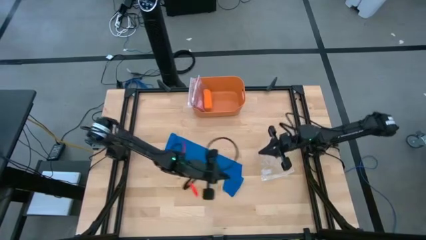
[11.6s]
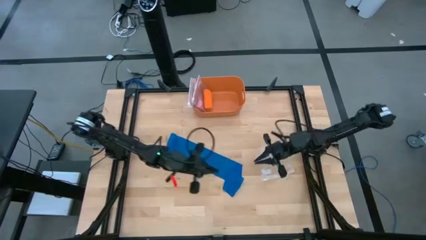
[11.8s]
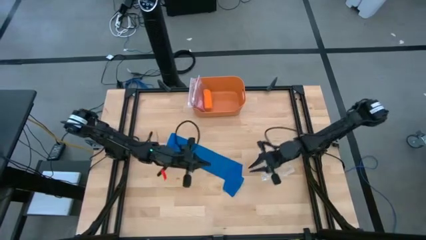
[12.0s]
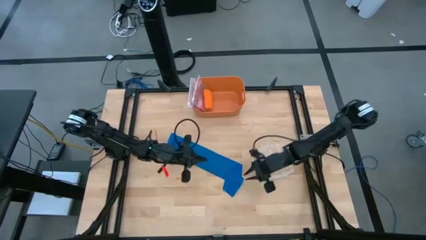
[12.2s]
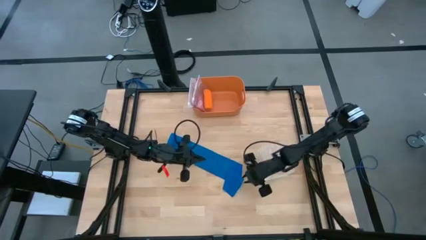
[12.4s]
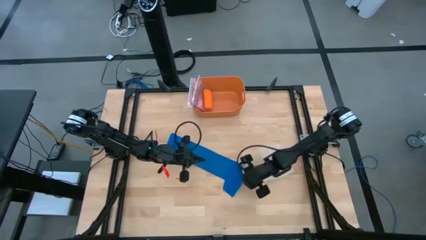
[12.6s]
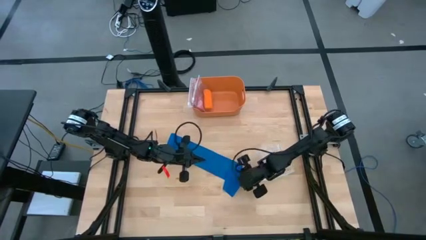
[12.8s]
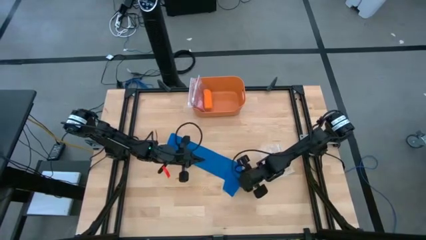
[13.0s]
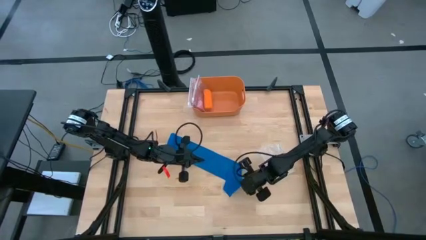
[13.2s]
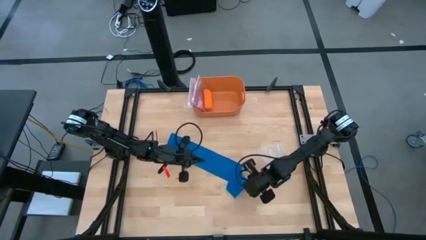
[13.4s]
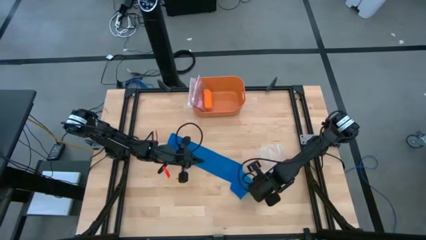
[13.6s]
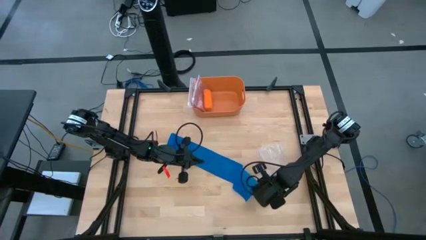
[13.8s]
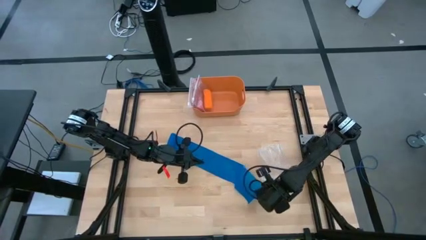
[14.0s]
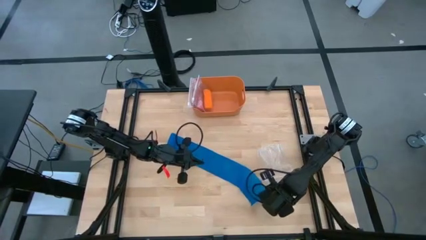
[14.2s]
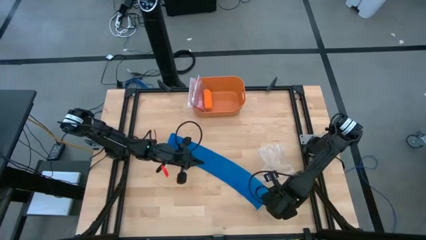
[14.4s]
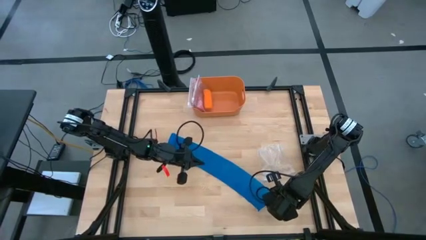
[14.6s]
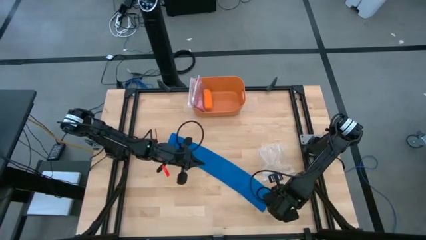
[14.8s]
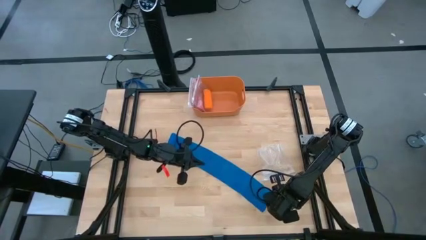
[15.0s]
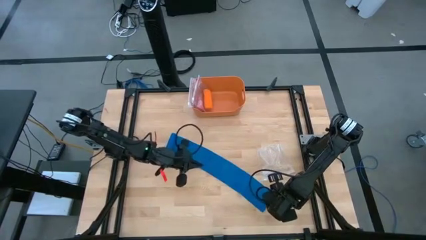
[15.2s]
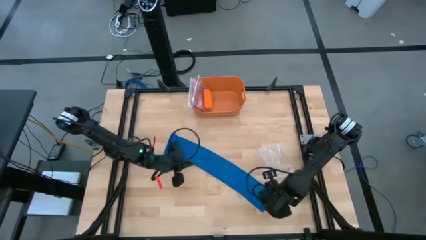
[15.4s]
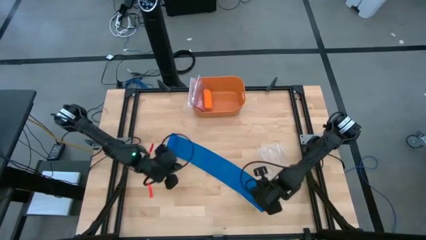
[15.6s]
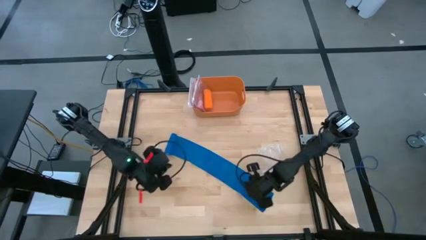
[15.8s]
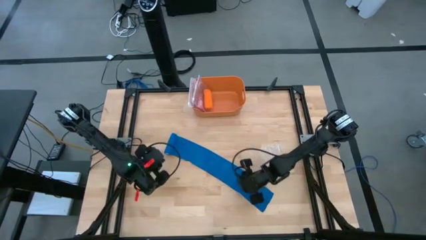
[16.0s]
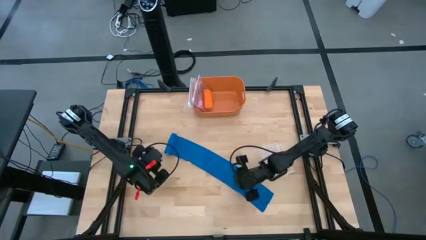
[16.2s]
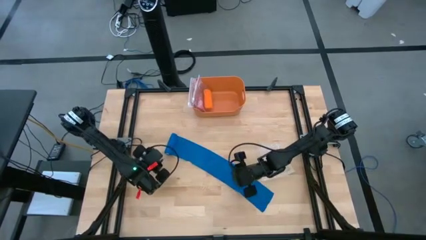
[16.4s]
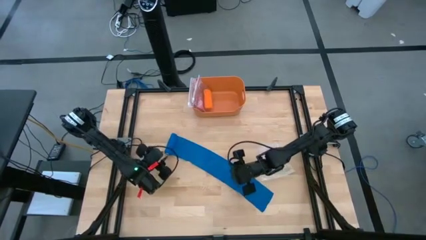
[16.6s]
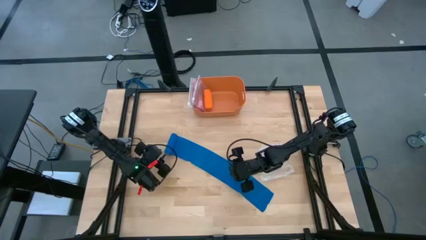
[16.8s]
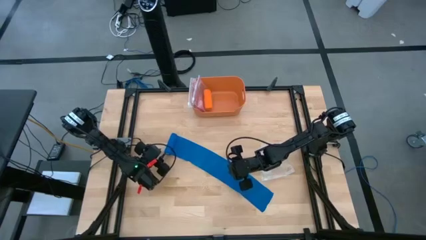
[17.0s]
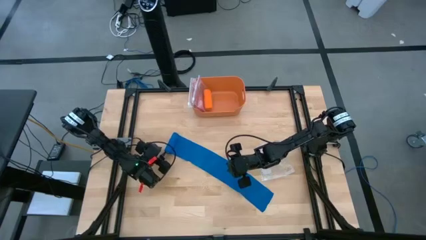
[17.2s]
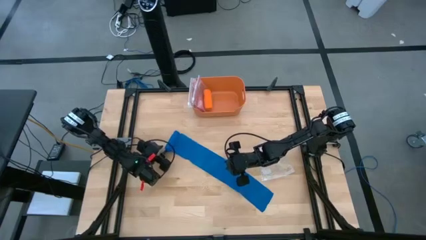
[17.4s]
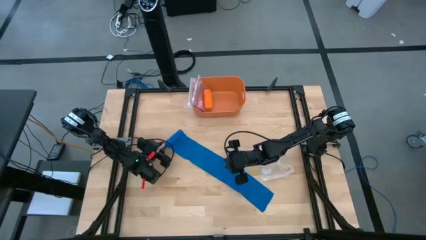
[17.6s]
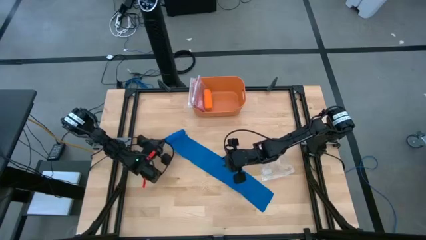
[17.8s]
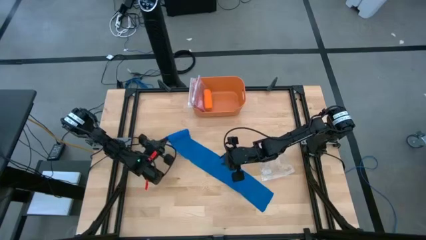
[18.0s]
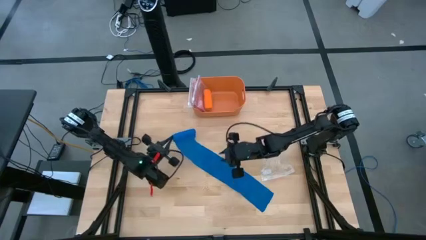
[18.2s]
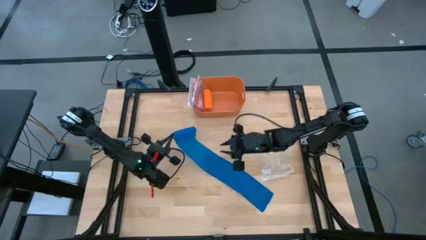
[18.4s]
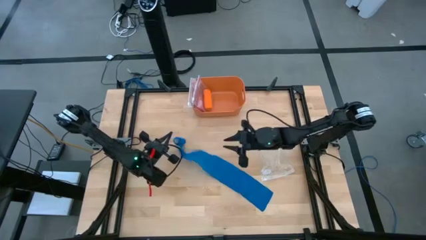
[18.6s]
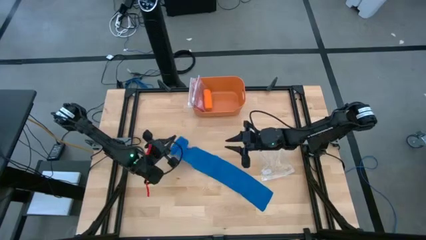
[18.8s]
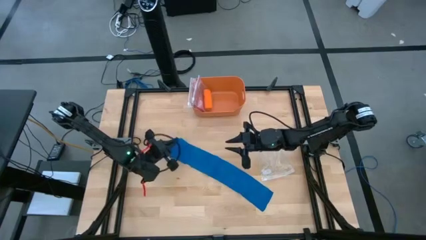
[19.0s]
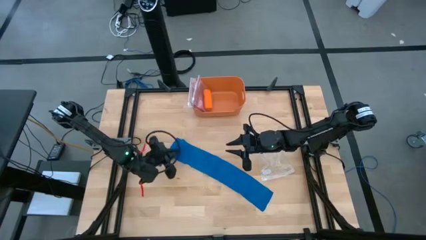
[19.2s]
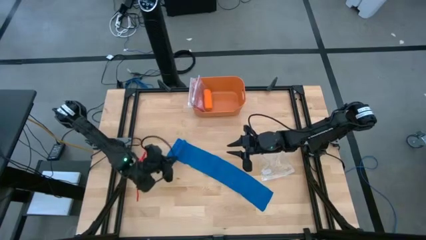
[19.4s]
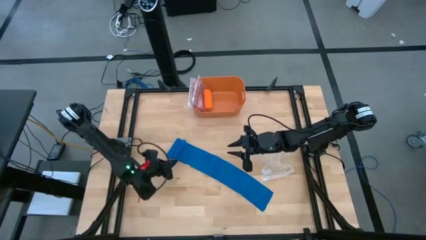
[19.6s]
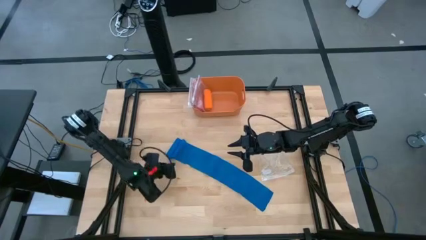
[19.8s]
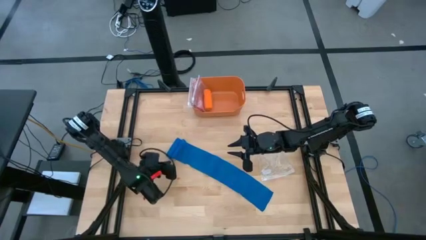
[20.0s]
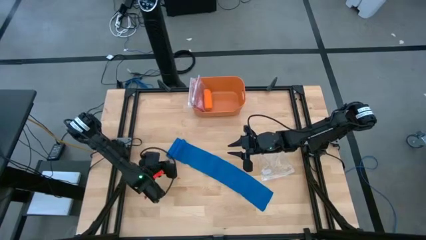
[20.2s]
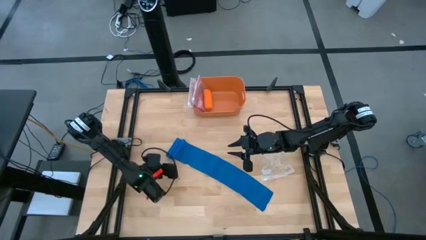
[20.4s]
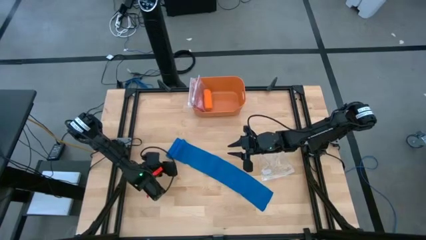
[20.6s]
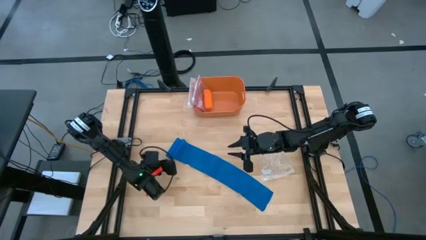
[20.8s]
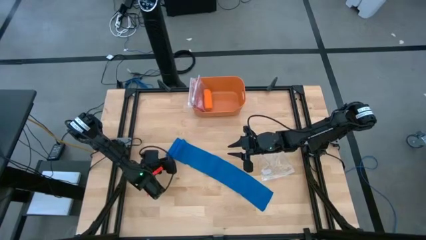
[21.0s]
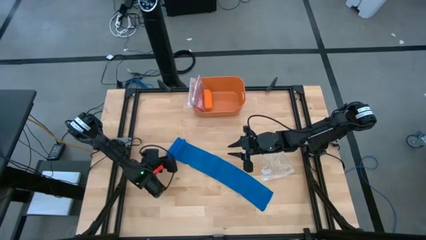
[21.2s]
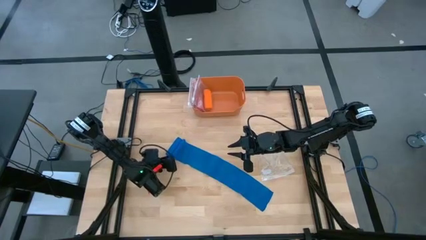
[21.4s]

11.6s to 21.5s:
Task: Roll bandage
Roll the blue bandage
